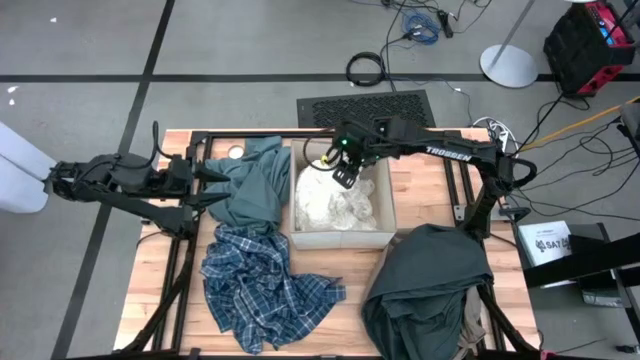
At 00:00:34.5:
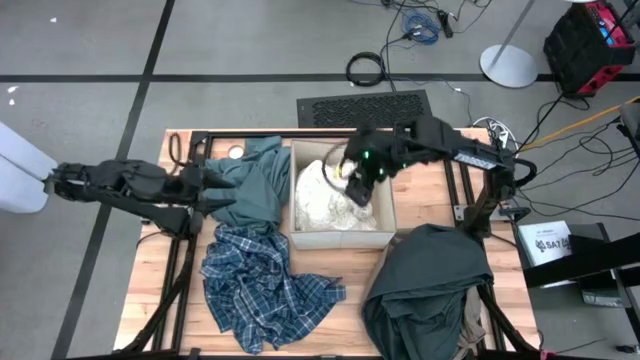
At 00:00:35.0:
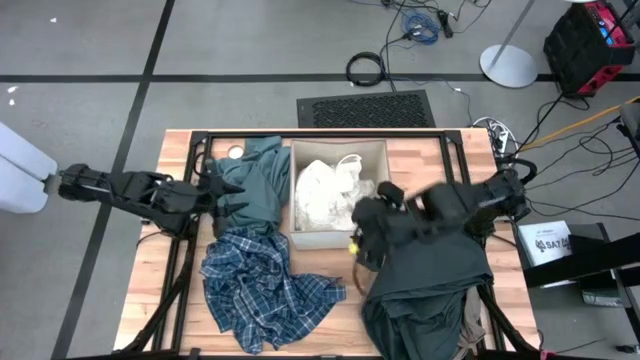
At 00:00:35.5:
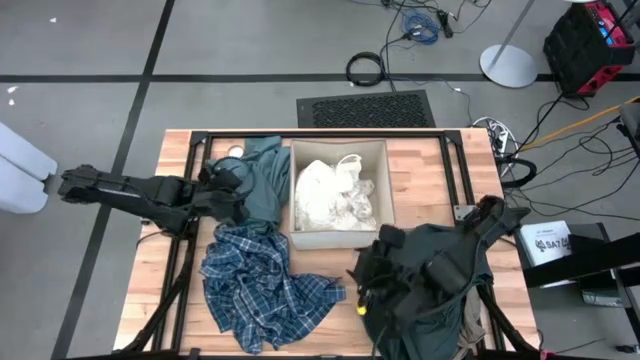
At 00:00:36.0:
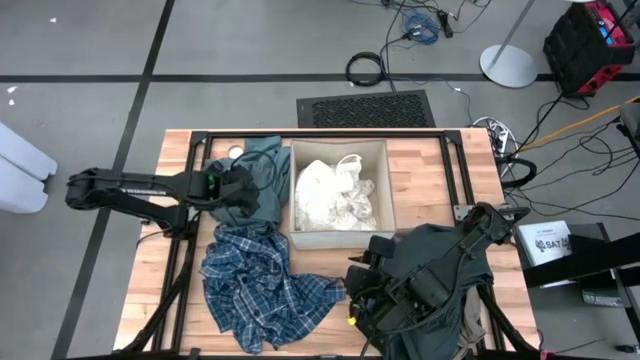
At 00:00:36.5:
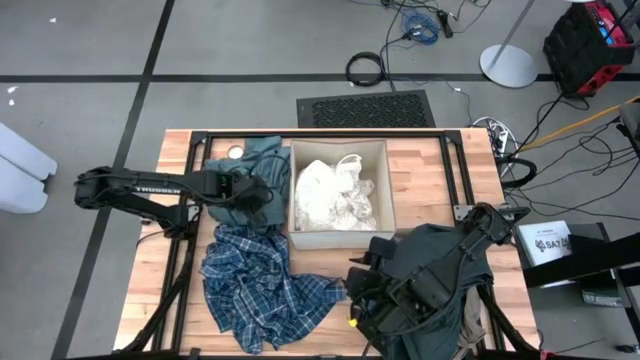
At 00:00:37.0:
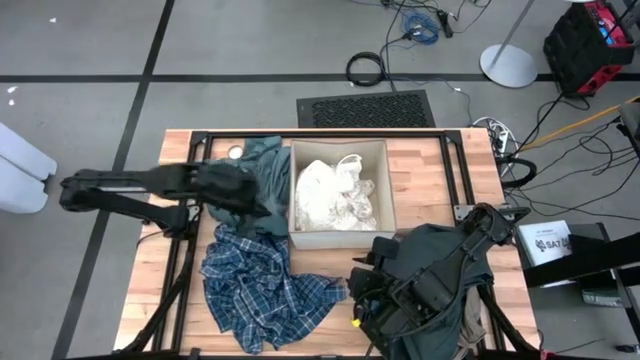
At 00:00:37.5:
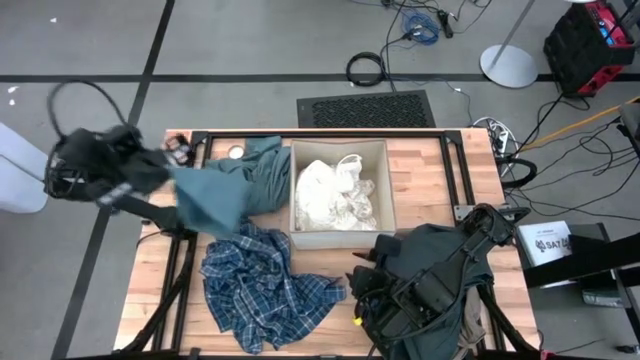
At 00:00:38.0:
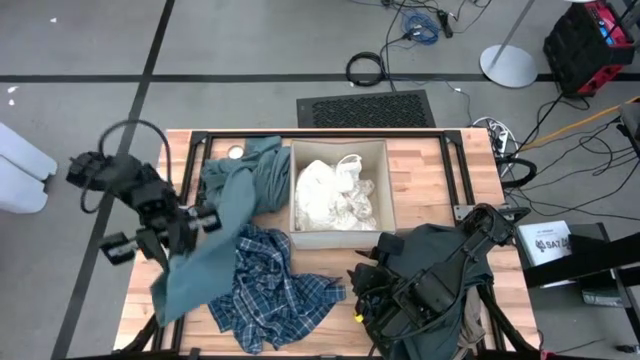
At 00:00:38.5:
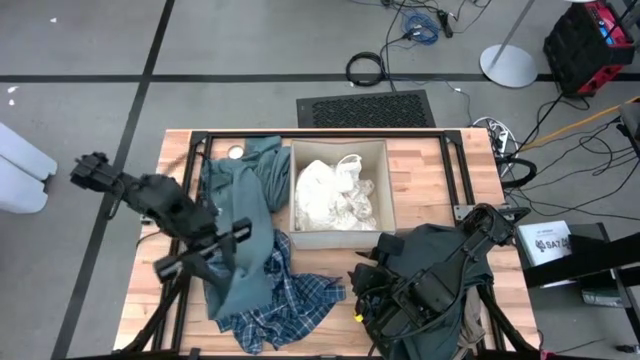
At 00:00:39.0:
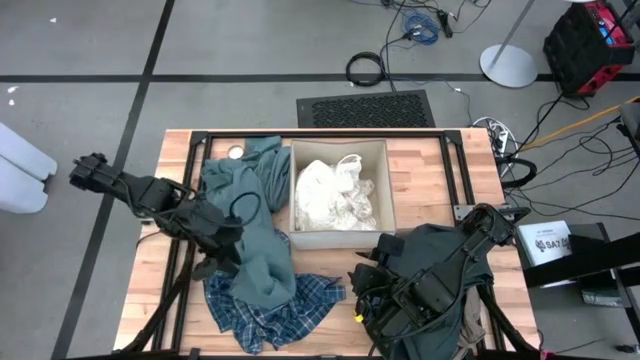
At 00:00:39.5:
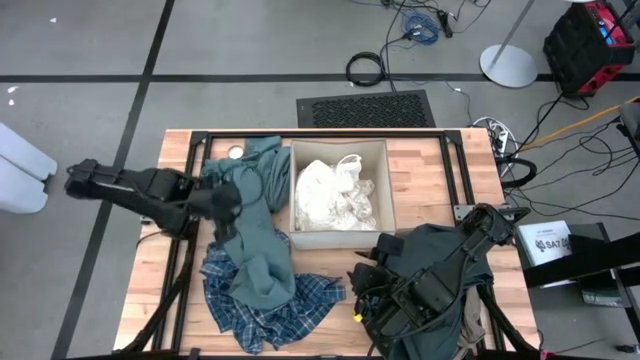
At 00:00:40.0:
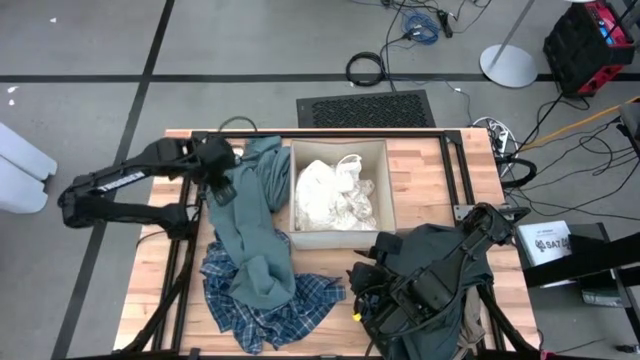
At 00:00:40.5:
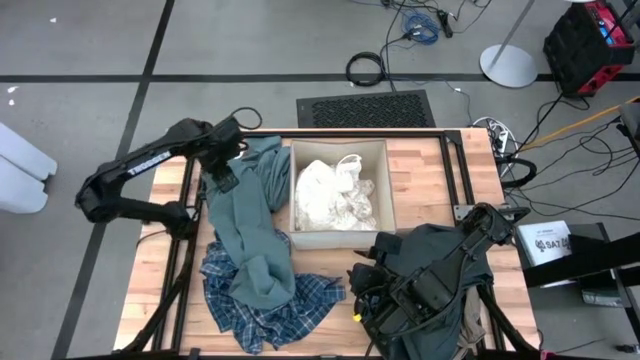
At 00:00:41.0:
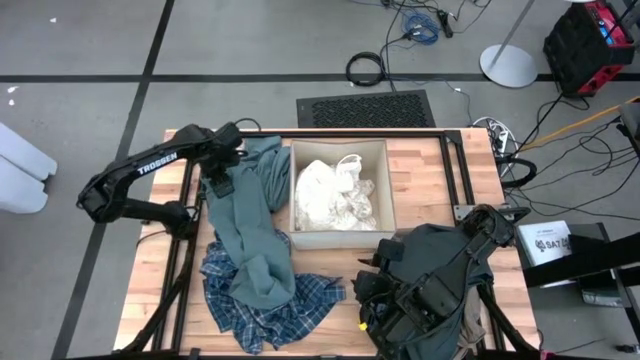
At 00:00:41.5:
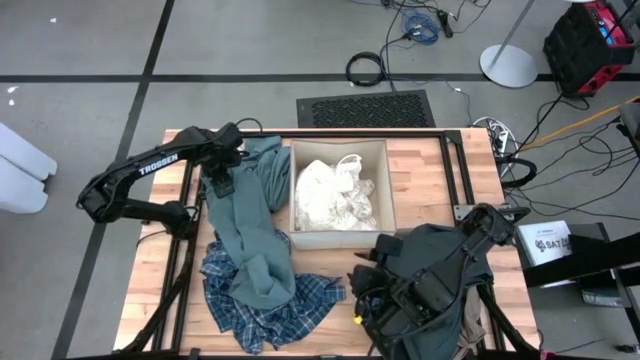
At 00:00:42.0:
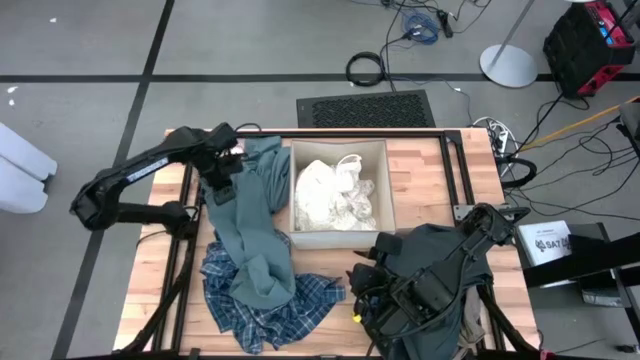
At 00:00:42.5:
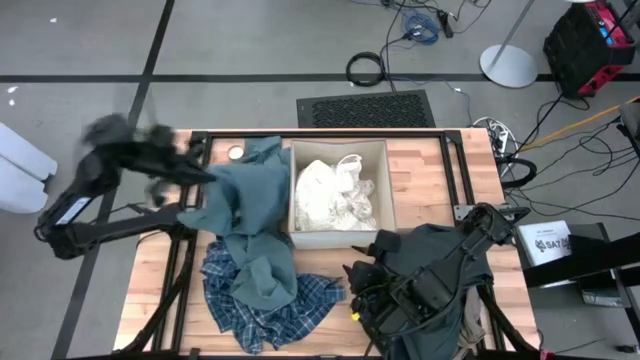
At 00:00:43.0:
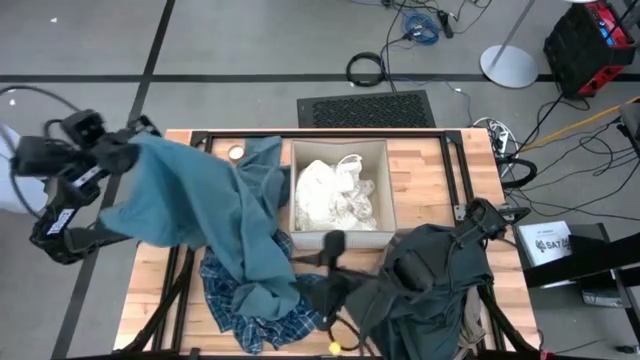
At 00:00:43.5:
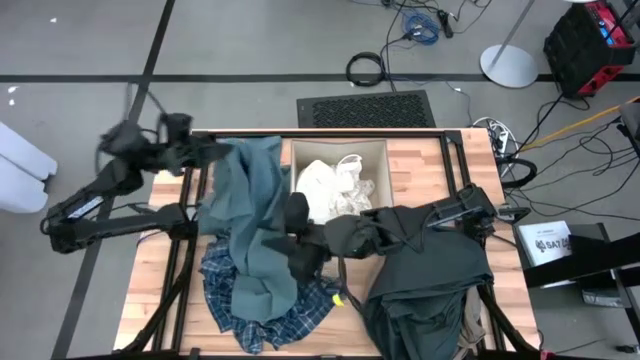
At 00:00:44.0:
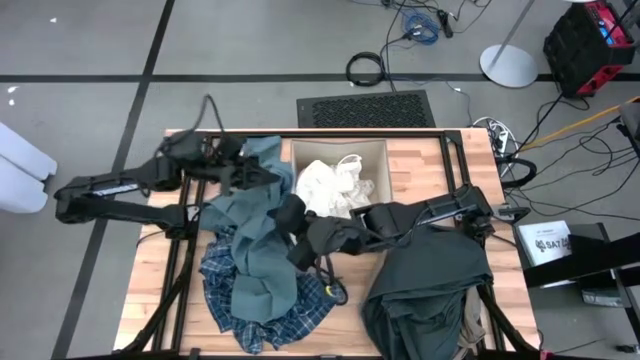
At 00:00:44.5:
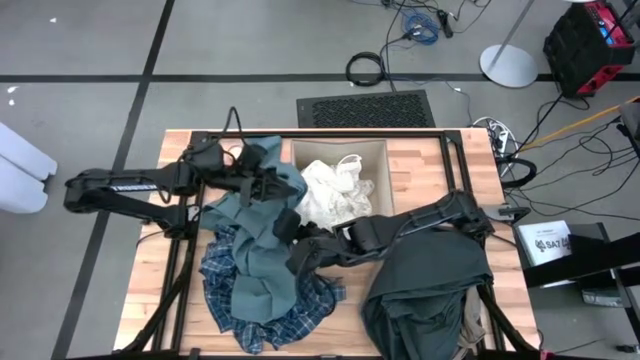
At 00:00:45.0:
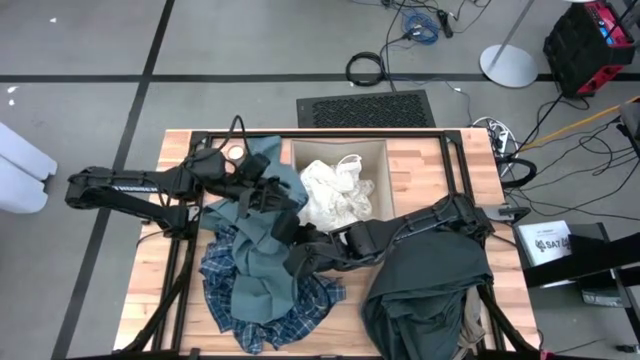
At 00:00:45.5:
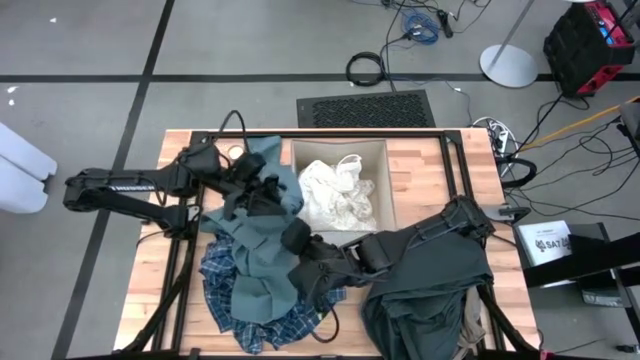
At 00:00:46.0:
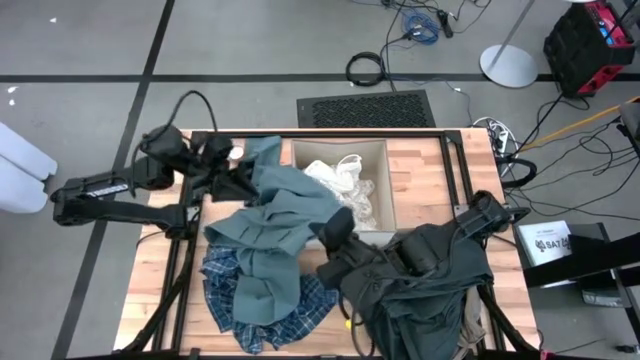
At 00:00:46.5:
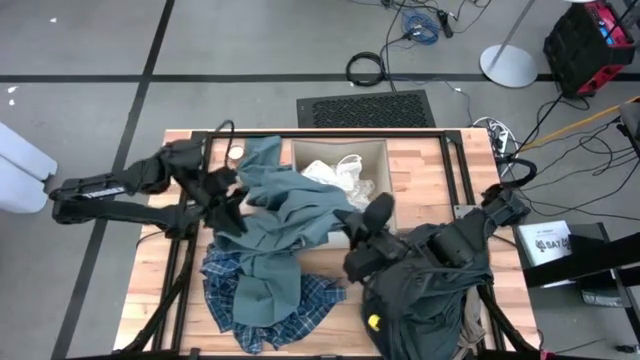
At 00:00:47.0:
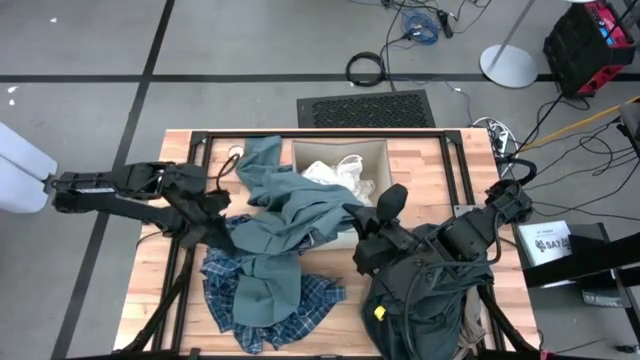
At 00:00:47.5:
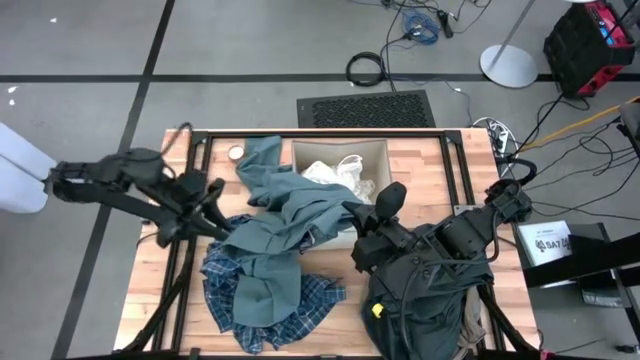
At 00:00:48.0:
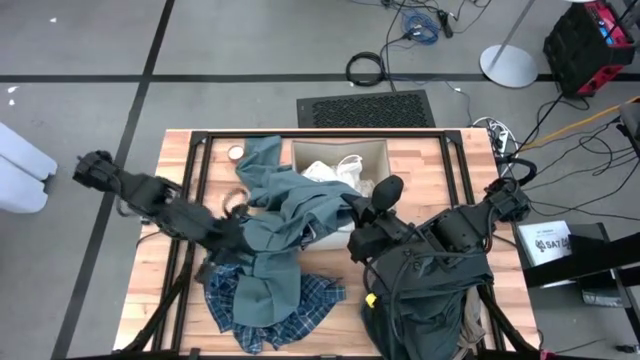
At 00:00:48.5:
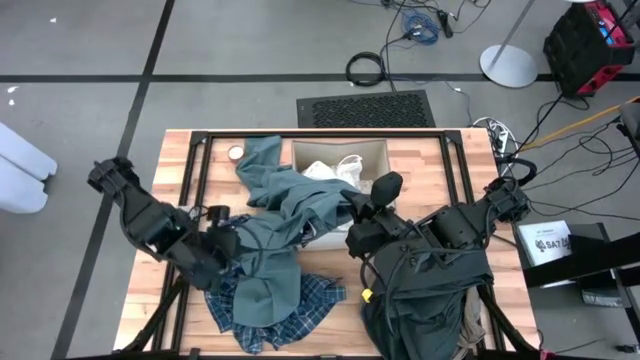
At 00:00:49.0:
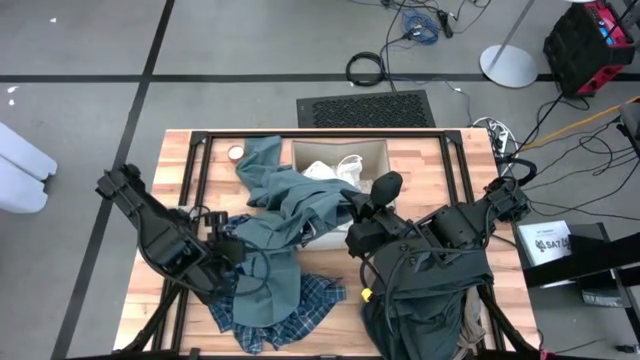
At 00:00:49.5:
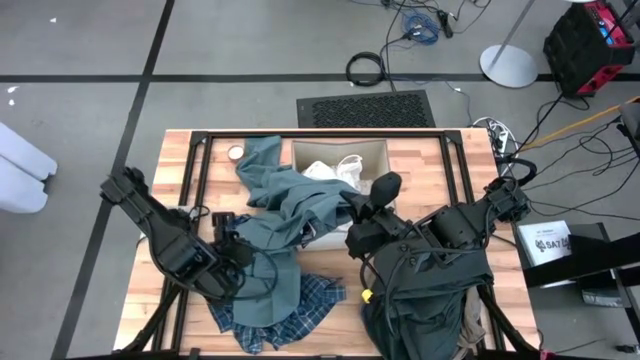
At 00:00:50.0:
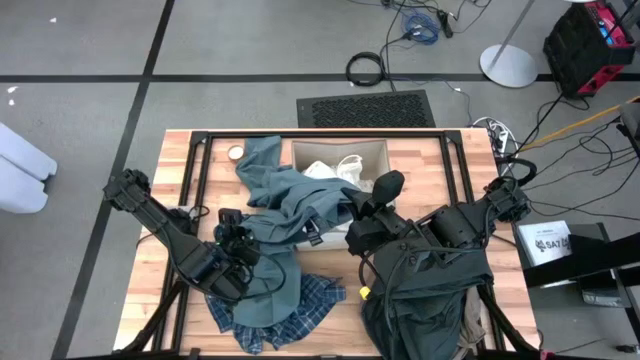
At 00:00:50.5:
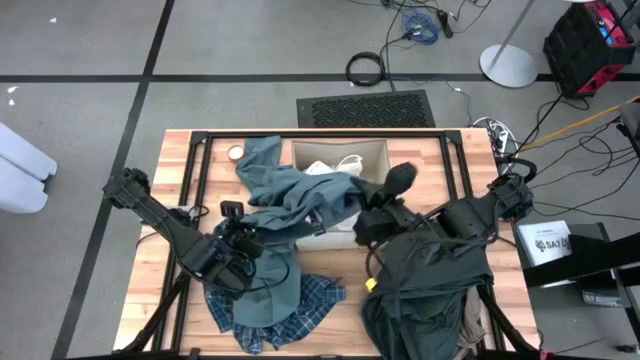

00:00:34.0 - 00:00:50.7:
Task: Sort clothes
Put the green pants into the laundry organizer
